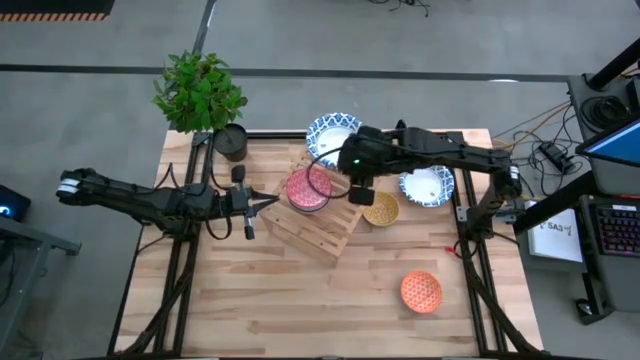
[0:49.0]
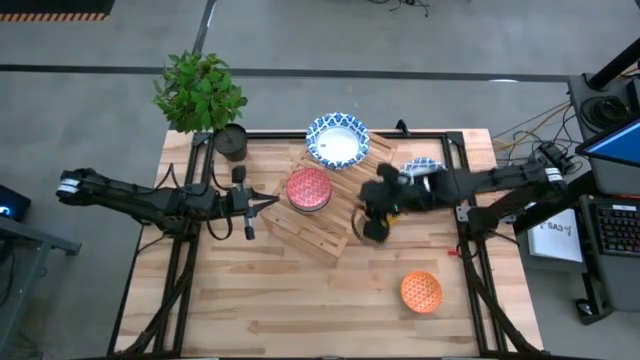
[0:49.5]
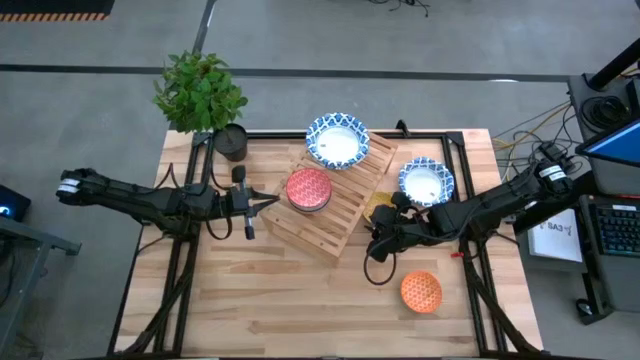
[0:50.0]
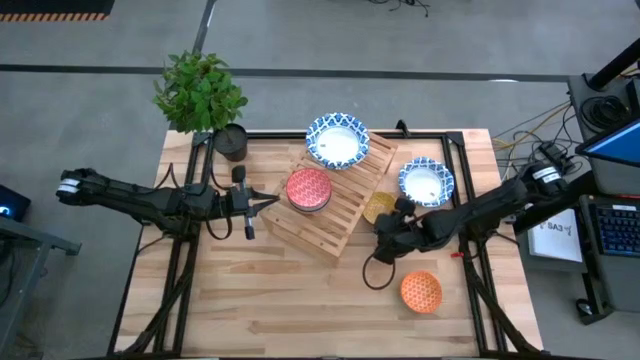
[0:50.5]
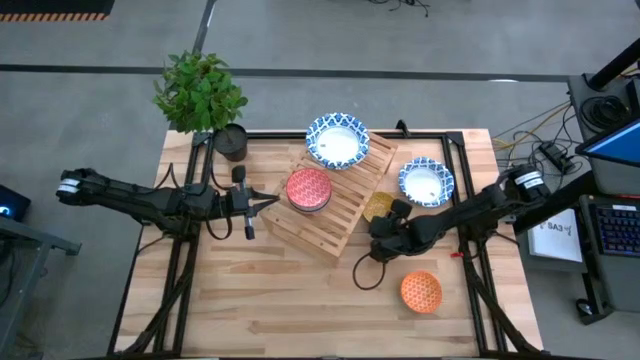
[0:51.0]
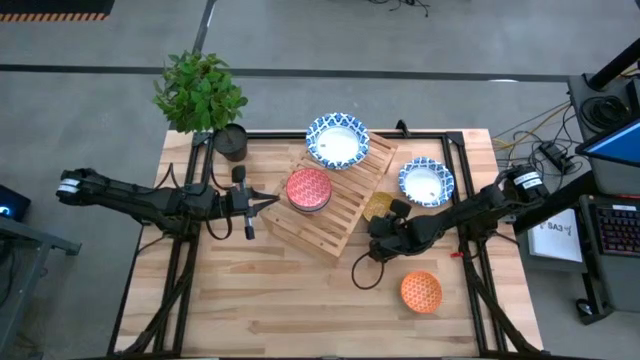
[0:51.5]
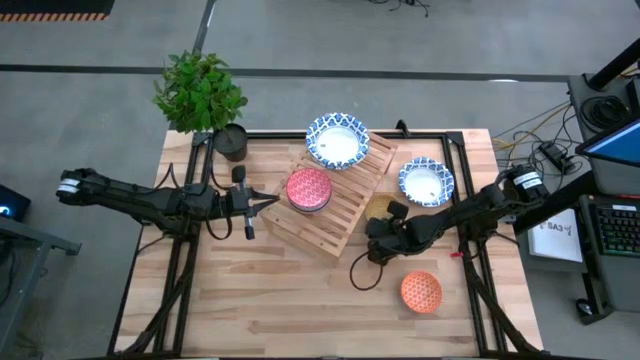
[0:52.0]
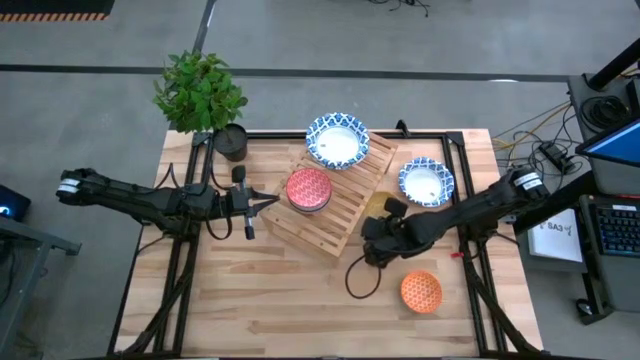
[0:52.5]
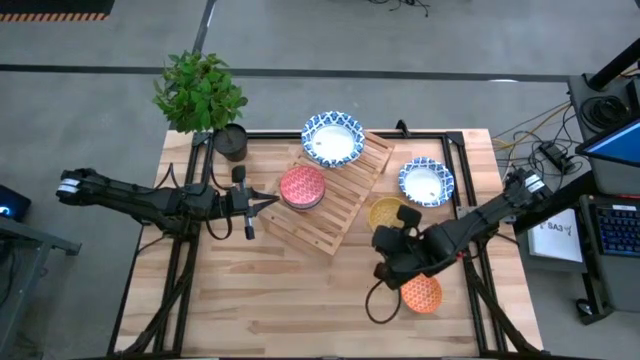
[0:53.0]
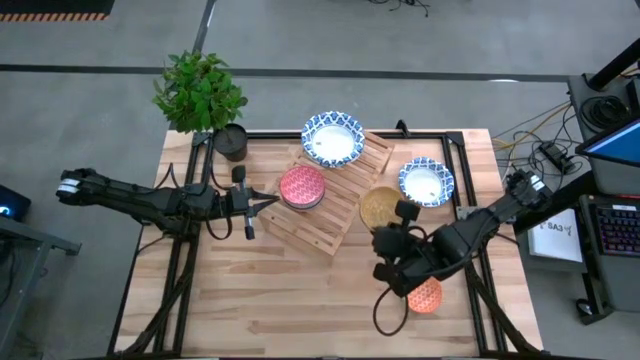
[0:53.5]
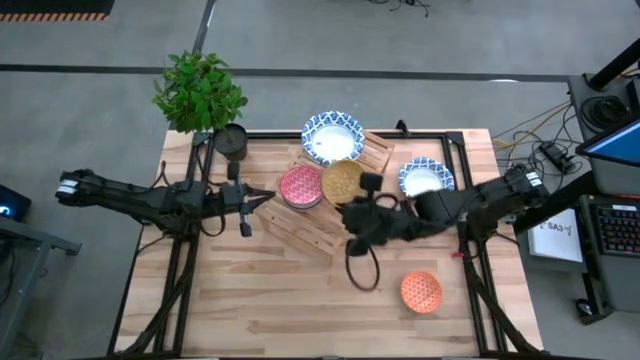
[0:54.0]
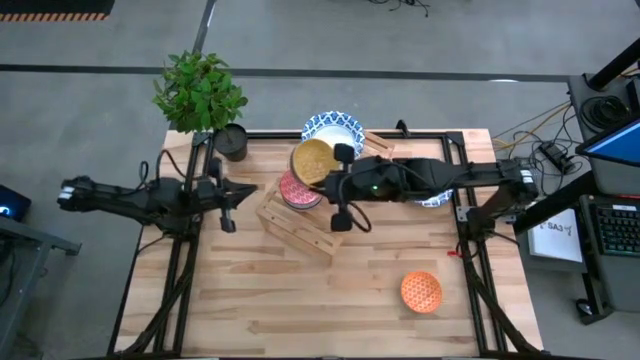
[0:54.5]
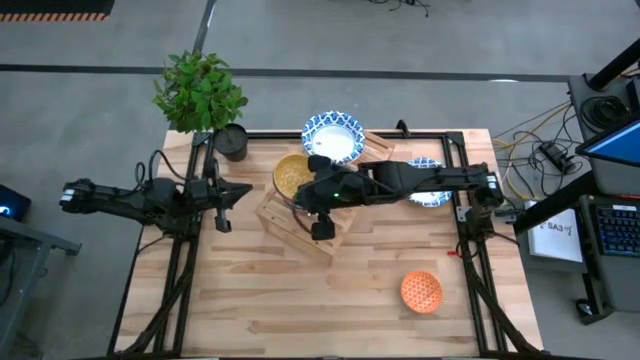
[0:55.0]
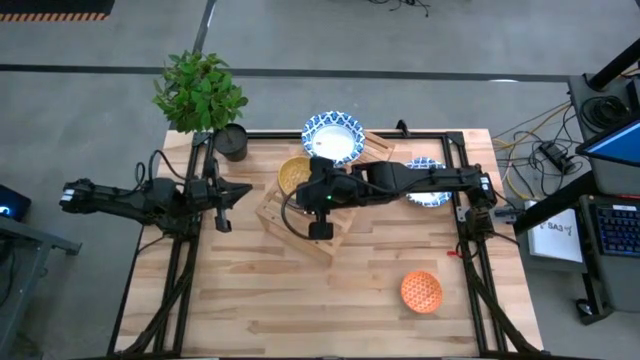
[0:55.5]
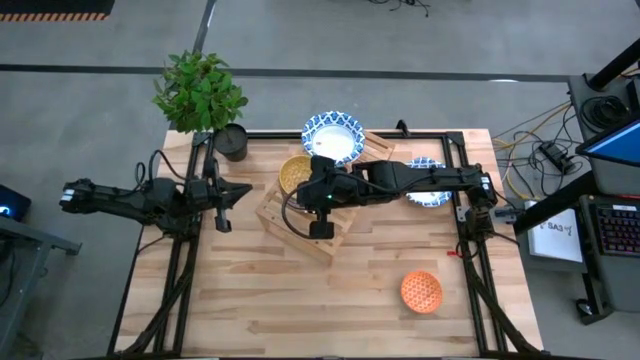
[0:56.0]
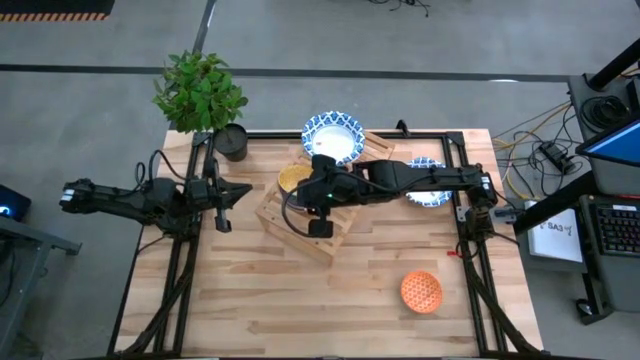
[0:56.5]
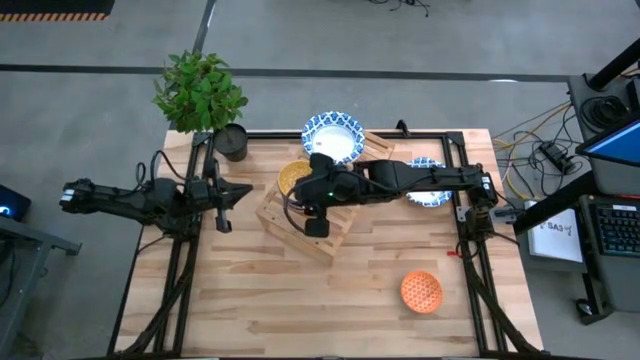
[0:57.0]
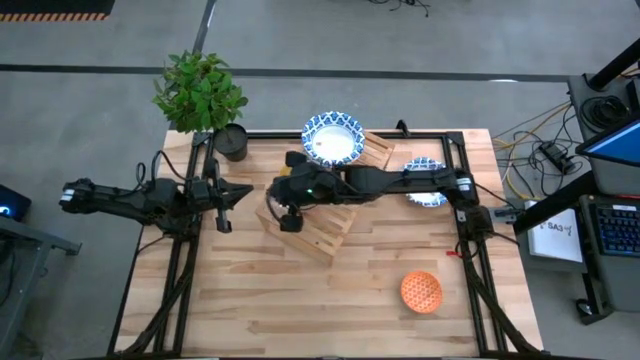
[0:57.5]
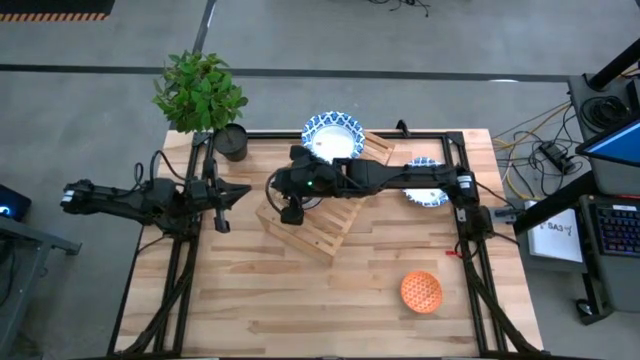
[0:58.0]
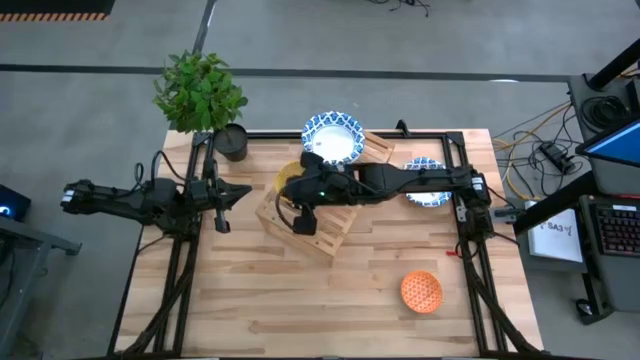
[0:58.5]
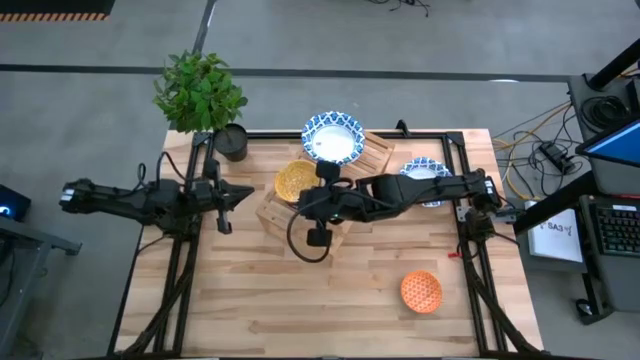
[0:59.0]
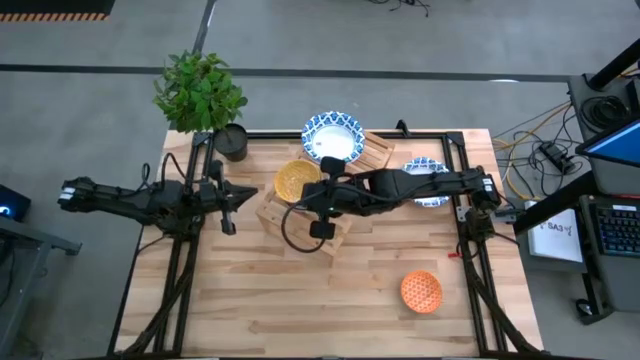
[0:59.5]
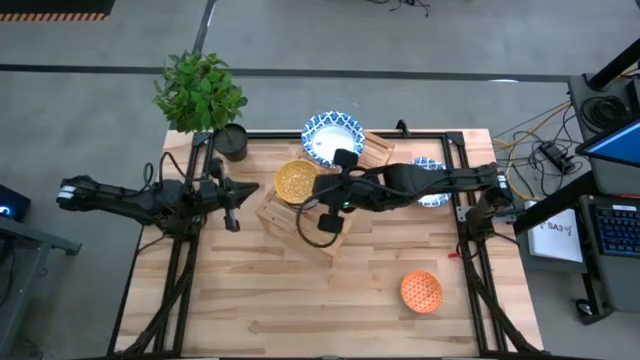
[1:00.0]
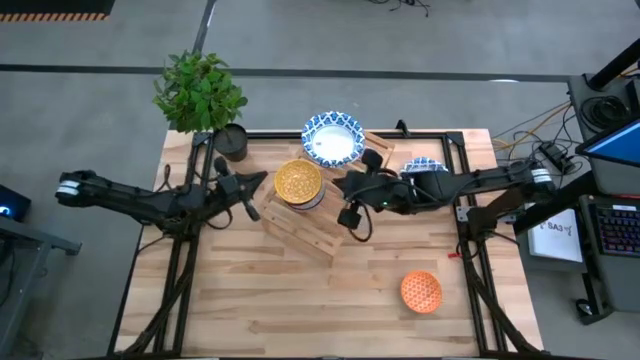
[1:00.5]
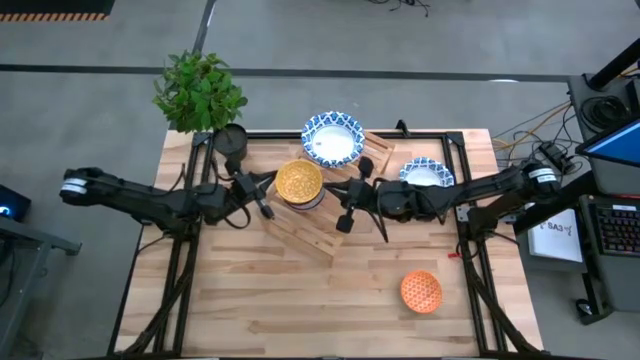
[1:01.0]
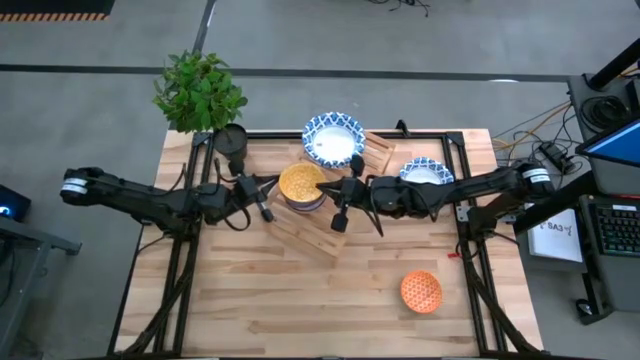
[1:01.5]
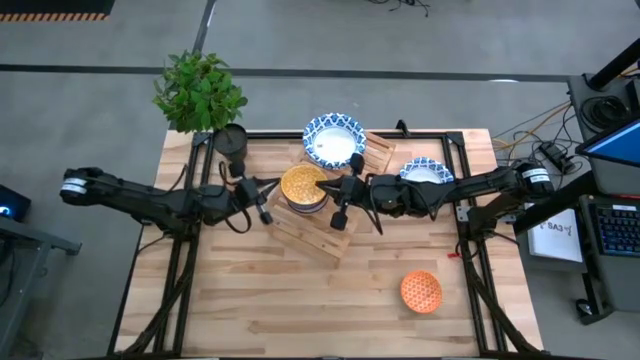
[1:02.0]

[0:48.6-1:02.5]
Task: Place and stack bowls onto a shelf
Stack the yellow patterned bowl on top of the red patterned bowl on the shelf

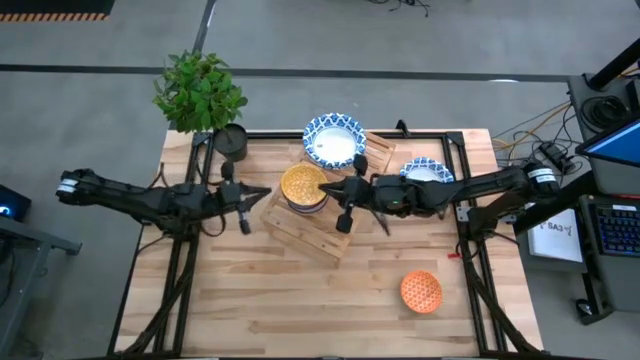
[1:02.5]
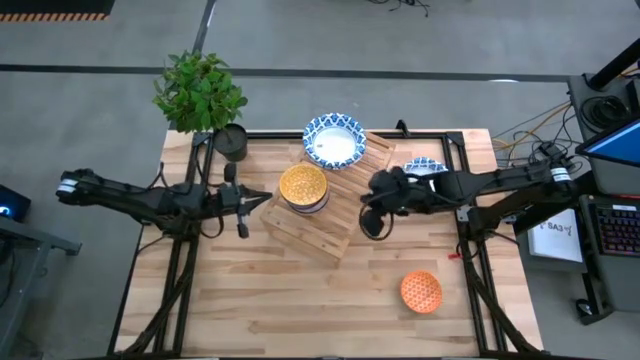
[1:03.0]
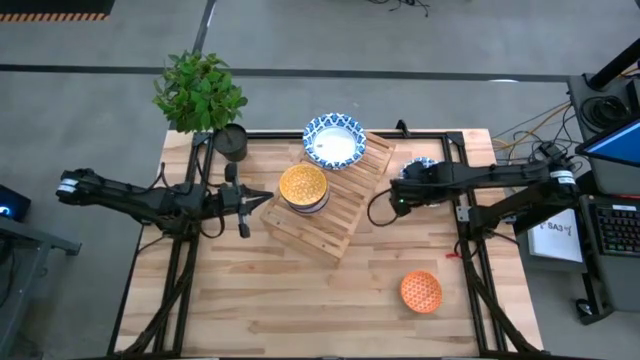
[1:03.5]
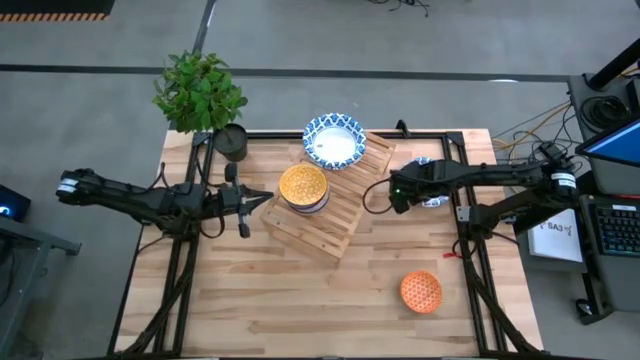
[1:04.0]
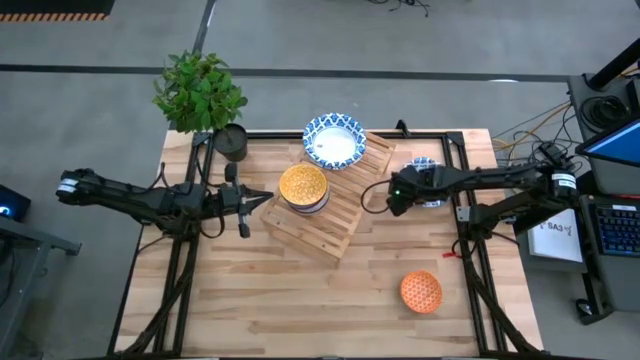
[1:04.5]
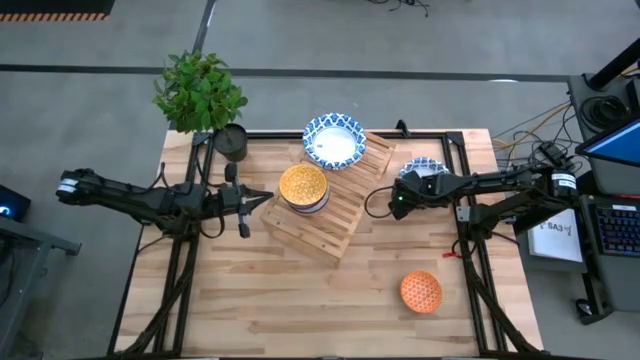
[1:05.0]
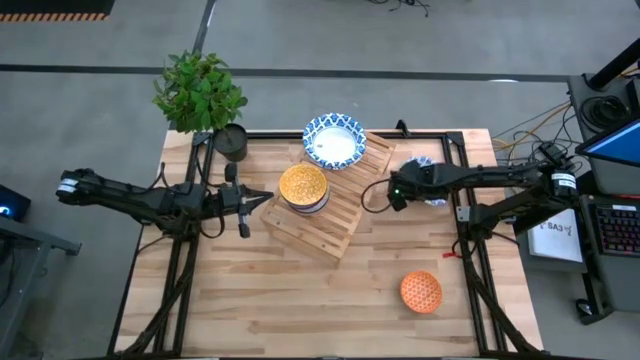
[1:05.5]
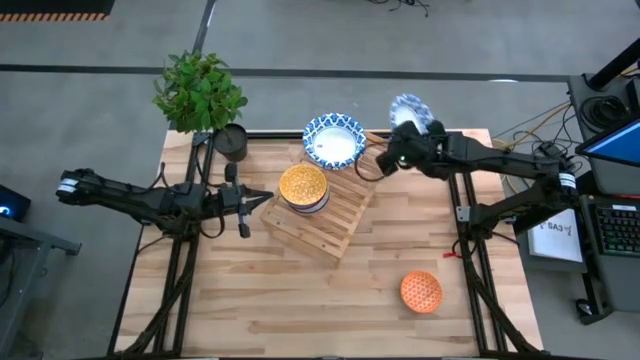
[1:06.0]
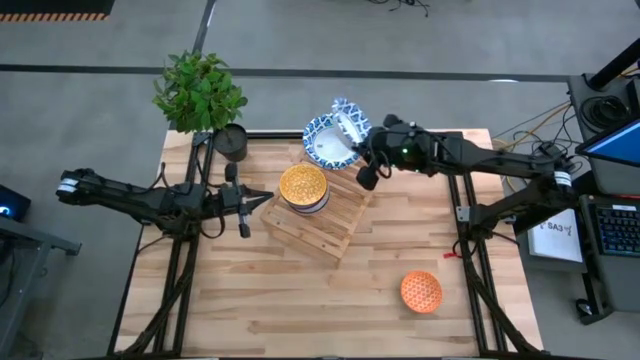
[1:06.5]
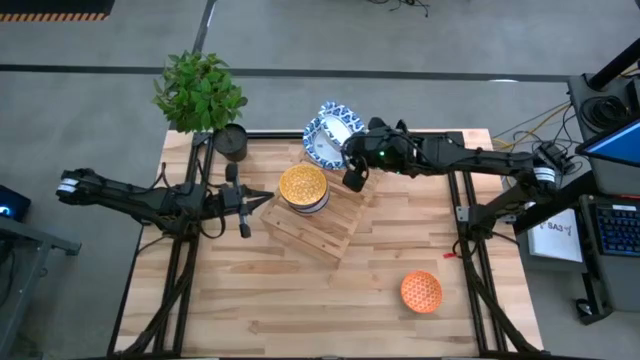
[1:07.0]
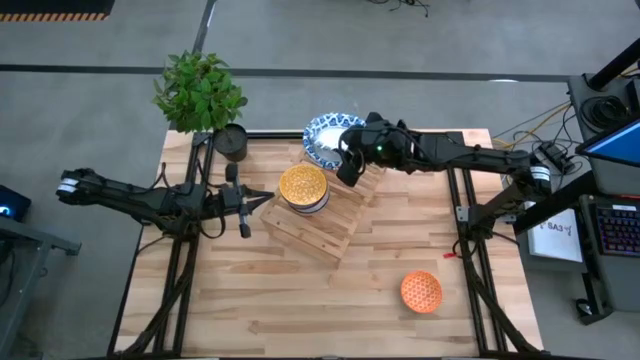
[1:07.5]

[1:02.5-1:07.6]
Stack the white patterned bowl on top of the white patterned bowl on the shelf
